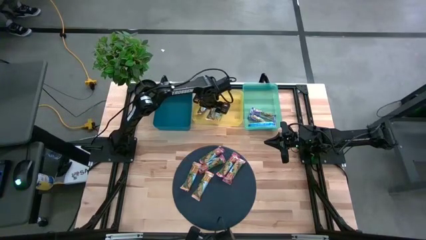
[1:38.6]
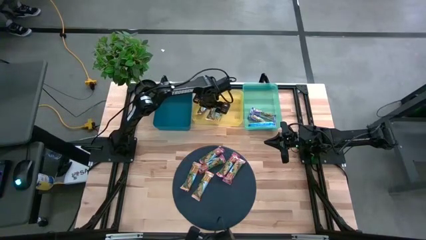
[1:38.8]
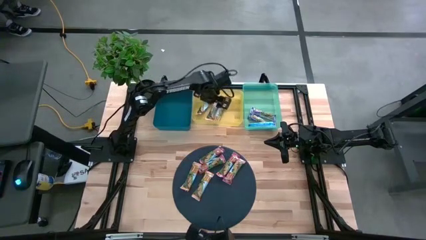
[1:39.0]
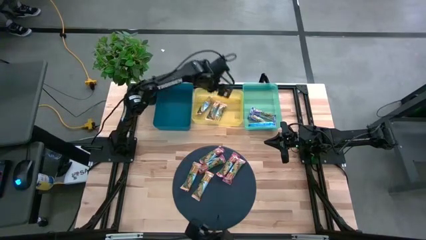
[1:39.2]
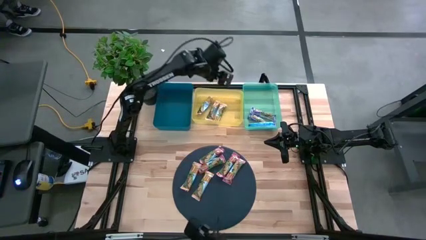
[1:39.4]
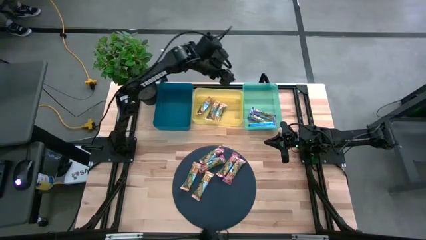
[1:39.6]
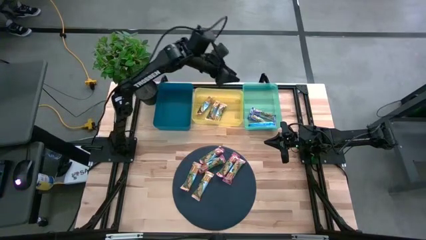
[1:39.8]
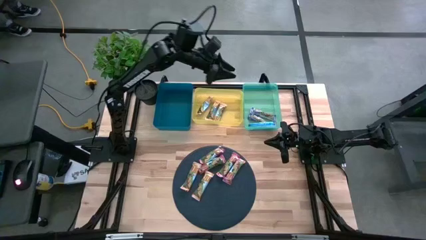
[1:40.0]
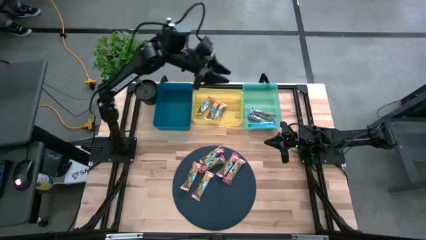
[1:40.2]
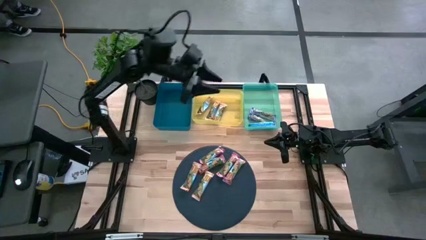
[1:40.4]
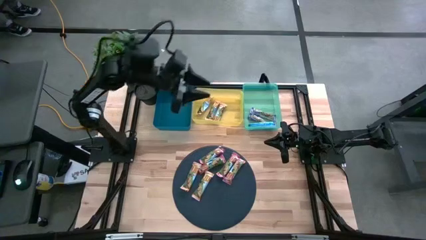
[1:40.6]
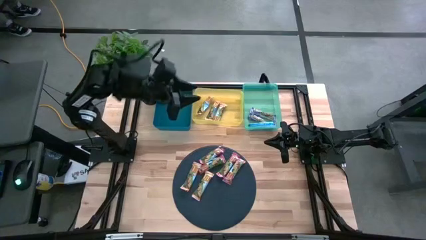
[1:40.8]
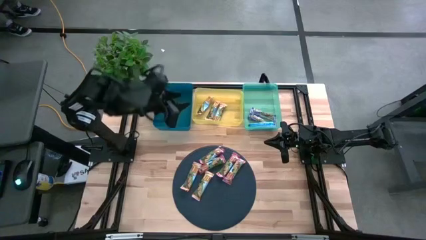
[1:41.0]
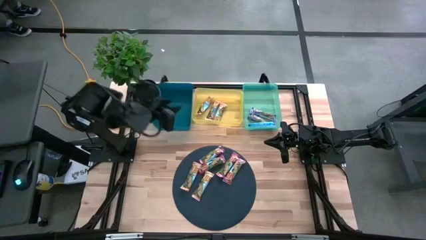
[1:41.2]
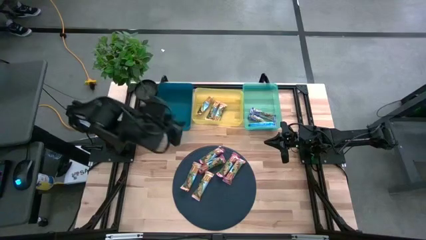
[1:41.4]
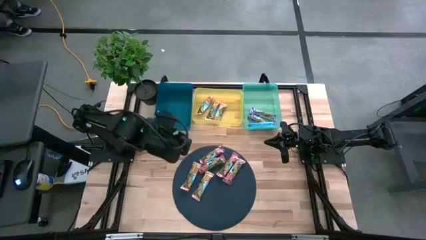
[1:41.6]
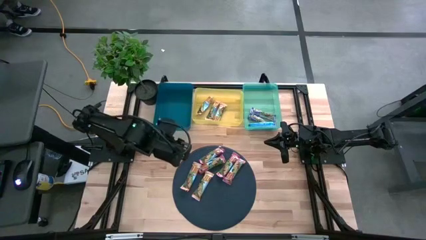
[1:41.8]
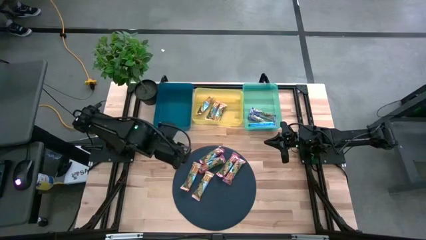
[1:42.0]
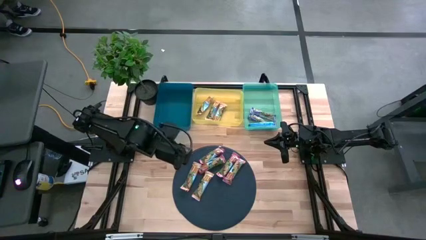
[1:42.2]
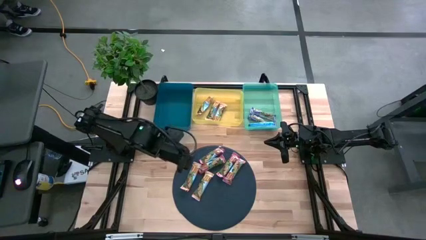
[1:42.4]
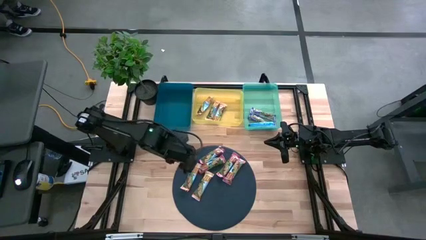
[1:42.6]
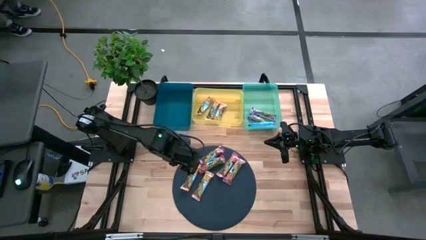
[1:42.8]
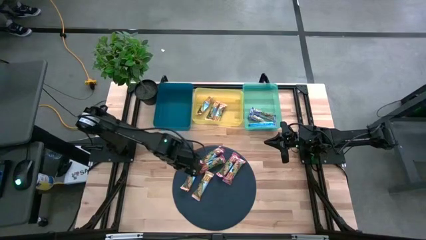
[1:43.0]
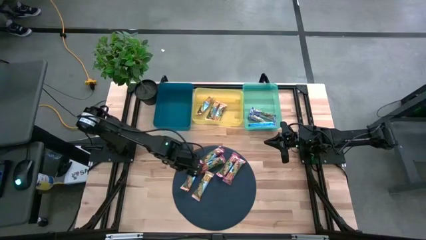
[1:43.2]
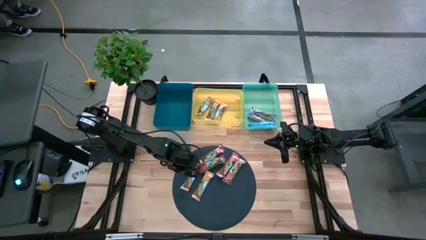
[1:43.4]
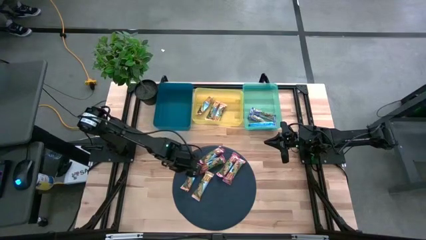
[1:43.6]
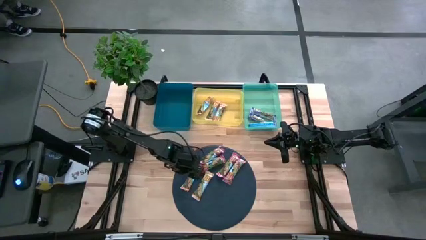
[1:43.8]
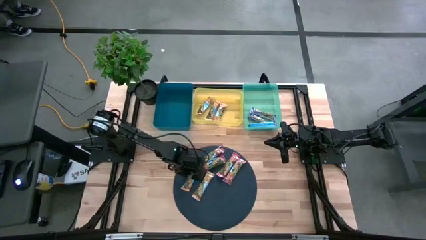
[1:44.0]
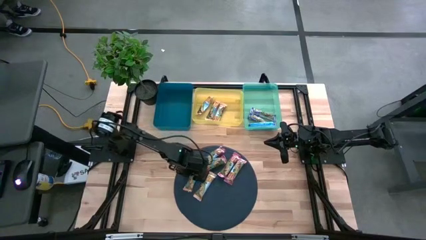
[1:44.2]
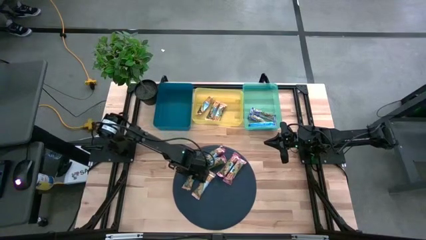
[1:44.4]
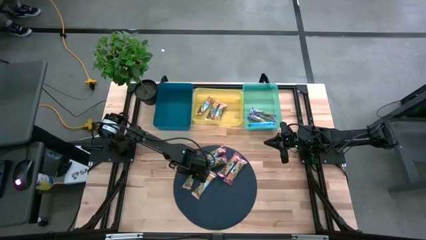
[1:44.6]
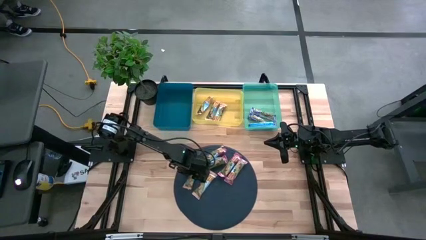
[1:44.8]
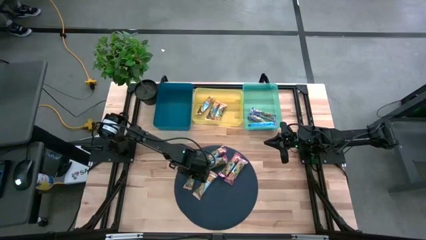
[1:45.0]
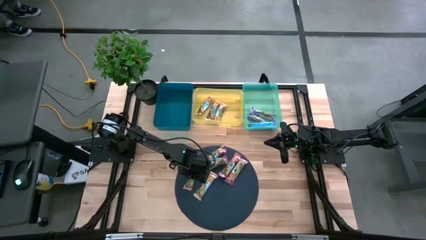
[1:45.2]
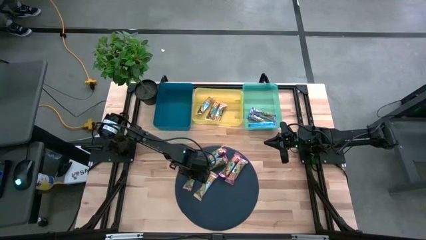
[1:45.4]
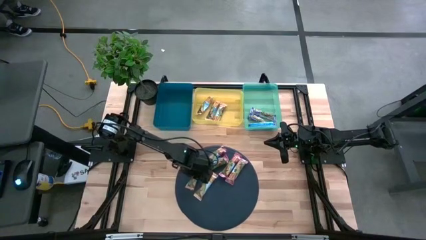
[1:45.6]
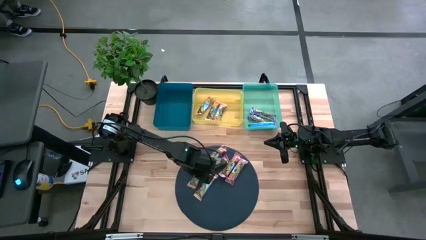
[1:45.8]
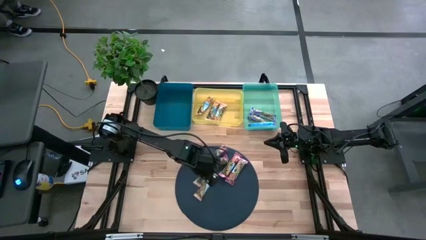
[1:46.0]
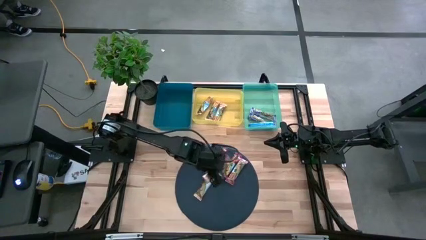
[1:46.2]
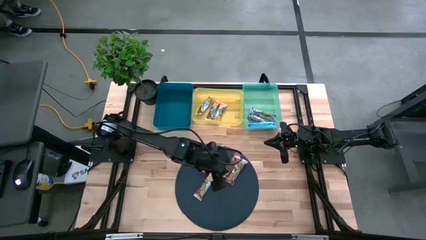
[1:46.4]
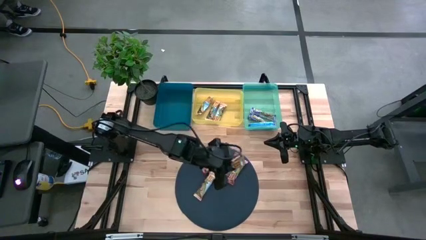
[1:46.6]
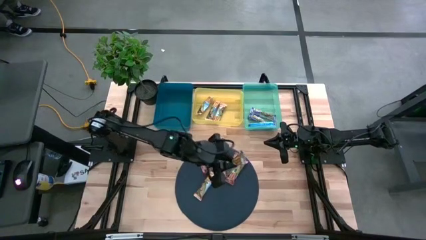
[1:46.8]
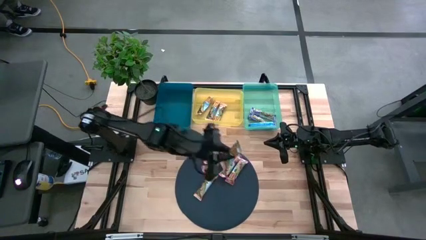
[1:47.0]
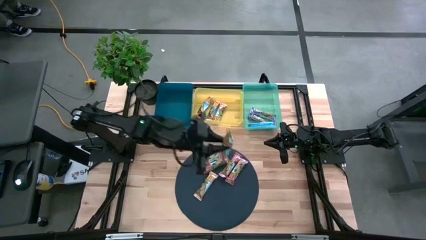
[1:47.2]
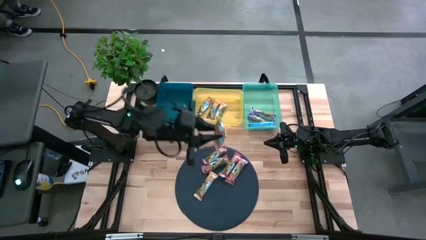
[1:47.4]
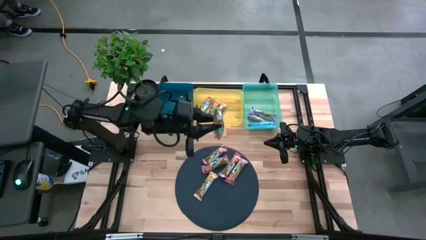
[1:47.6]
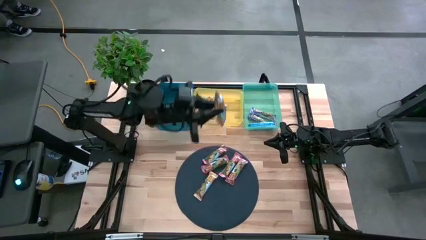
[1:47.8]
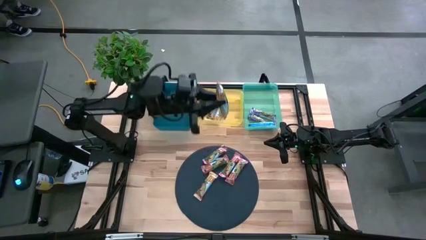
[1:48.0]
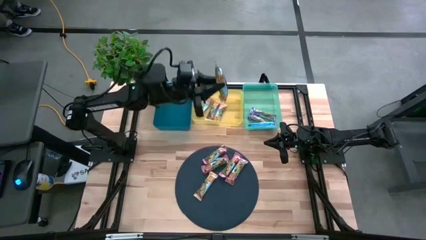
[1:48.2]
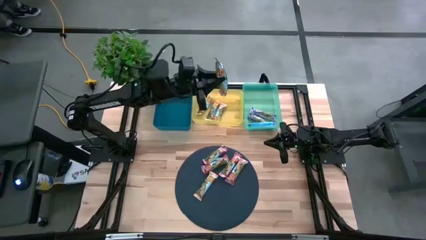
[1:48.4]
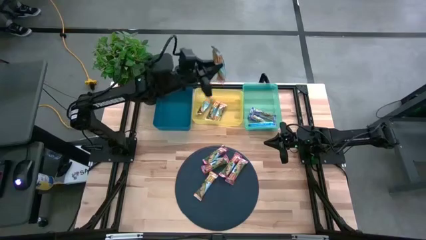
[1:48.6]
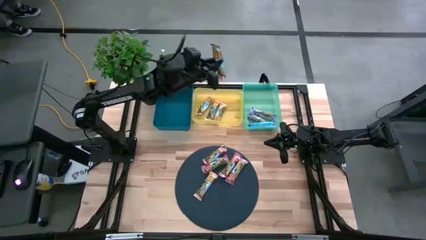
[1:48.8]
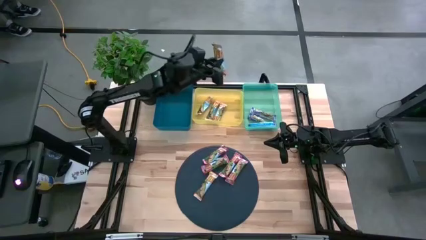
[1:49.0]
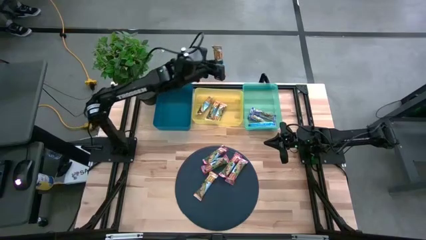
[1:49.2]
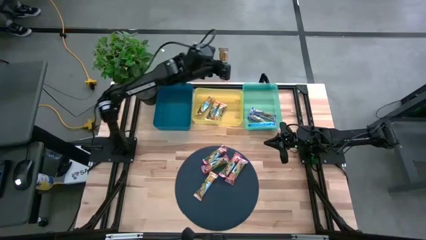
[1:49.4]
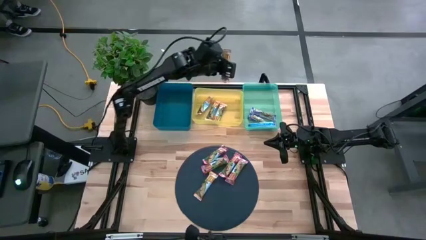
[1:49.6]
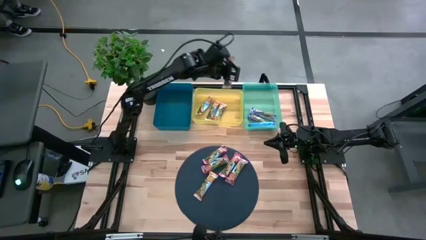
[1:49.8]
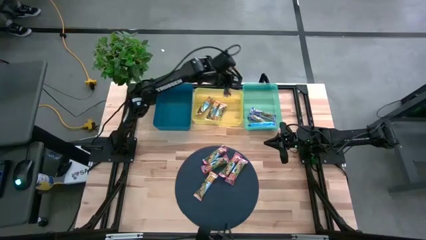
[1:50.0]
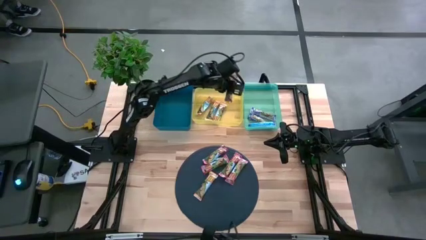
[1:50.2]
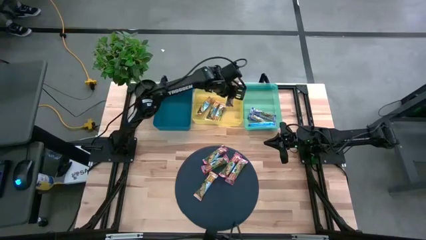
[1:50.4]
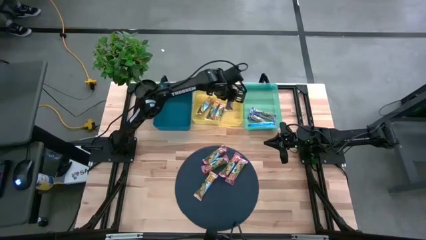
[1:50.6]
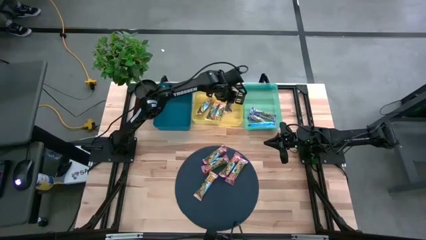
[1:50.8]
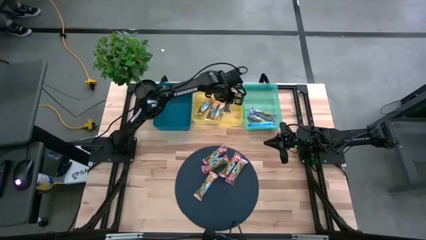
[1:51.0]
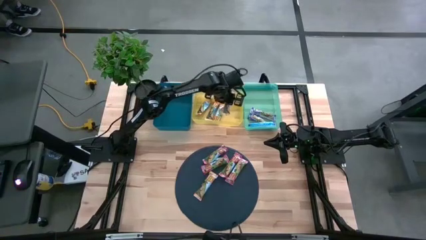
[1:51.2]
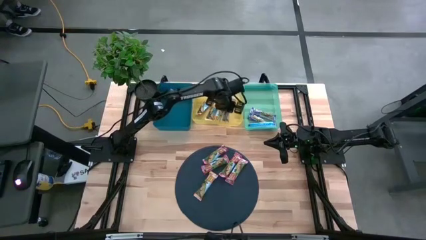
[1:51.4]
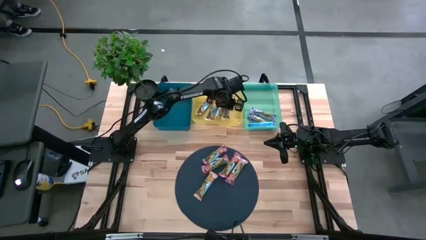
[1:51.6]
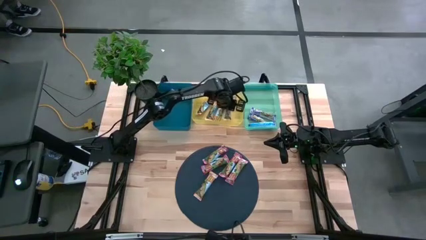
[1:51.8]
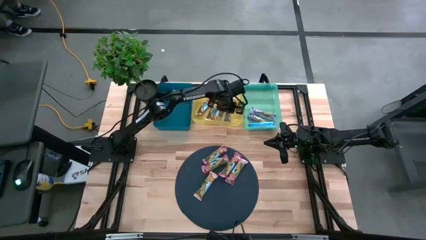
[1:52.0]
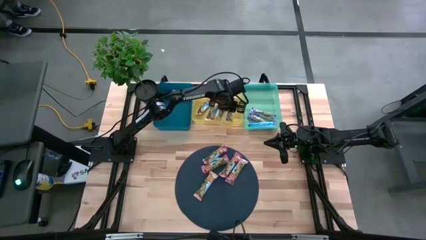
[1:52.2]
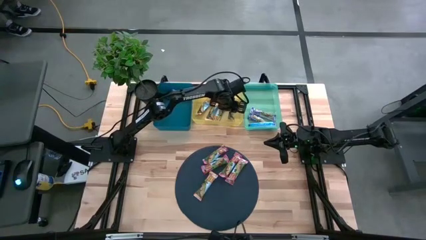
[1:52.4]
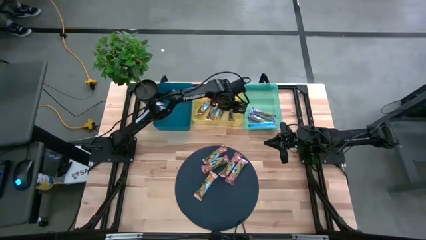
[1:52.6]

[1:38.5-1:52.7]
Task: Pick and place Granola Bars by type
Put the yellow granola bar into the yellow bin

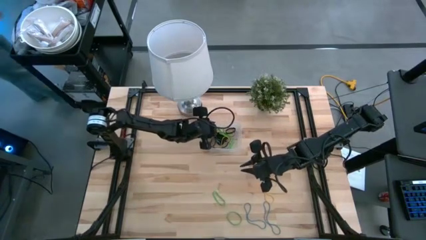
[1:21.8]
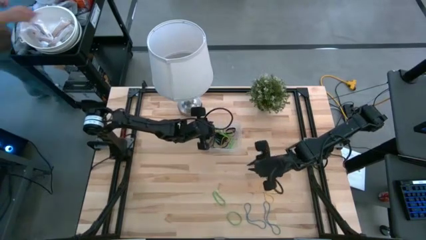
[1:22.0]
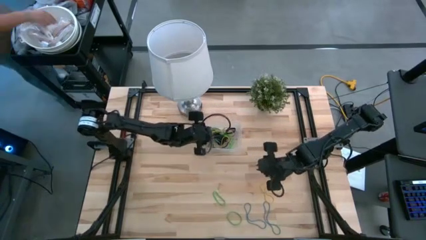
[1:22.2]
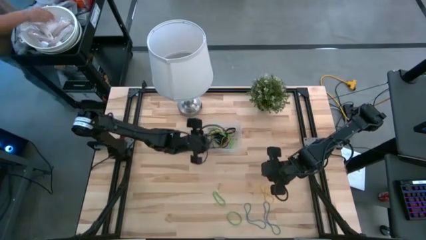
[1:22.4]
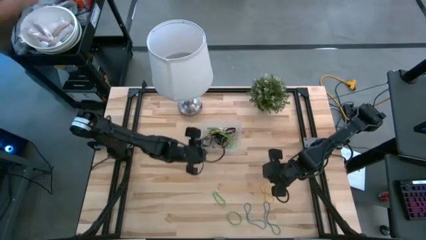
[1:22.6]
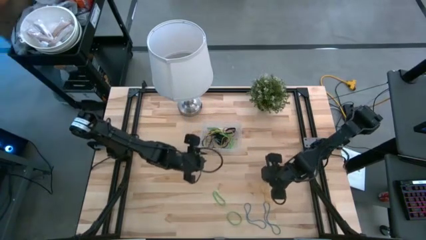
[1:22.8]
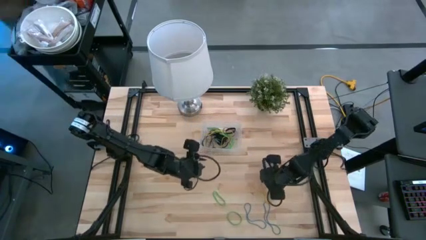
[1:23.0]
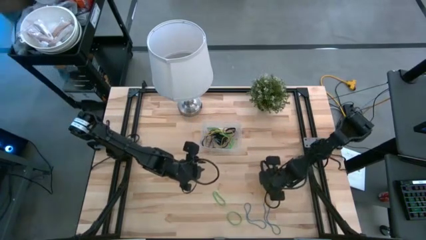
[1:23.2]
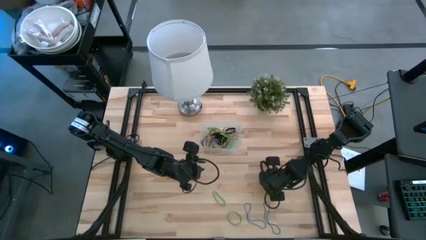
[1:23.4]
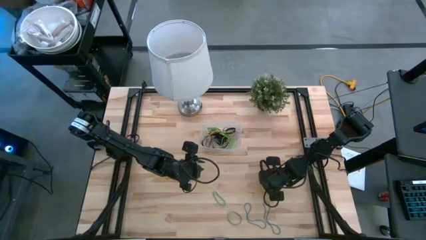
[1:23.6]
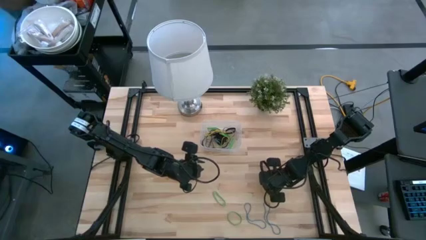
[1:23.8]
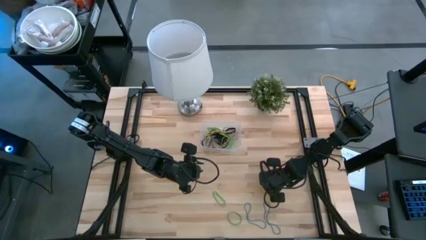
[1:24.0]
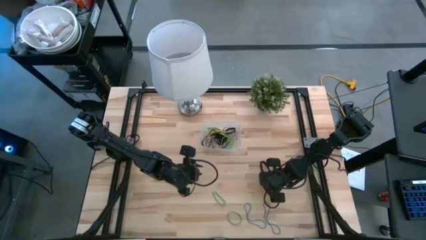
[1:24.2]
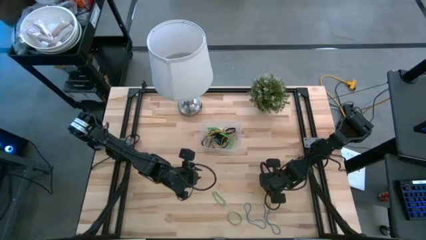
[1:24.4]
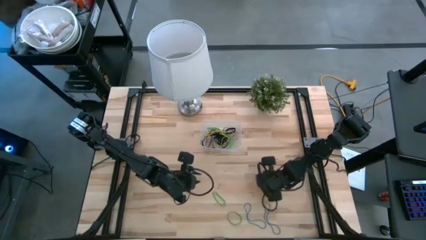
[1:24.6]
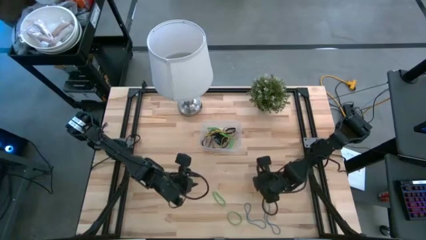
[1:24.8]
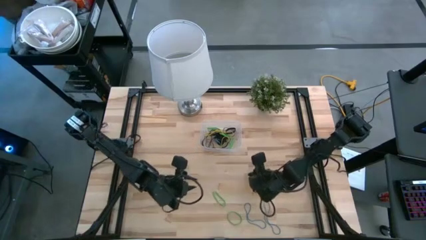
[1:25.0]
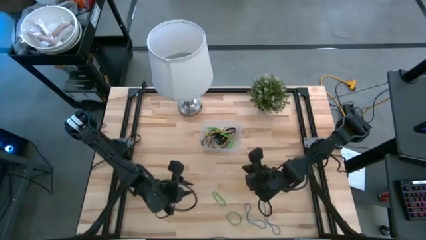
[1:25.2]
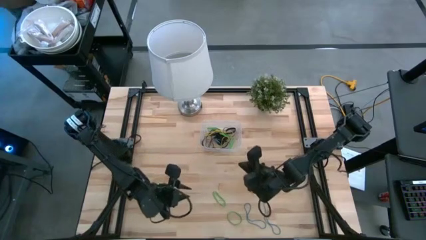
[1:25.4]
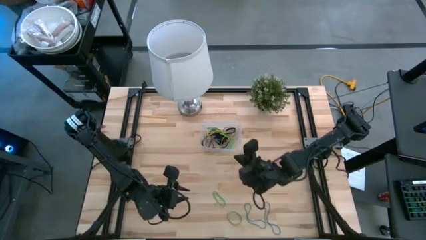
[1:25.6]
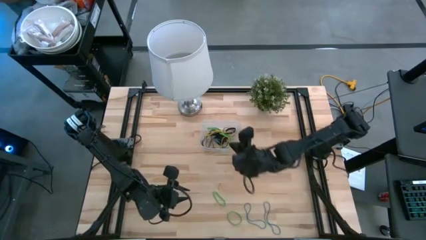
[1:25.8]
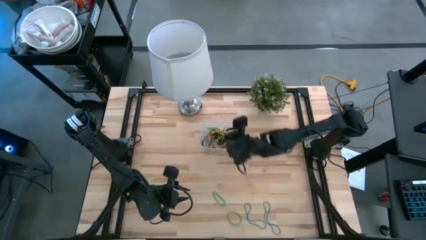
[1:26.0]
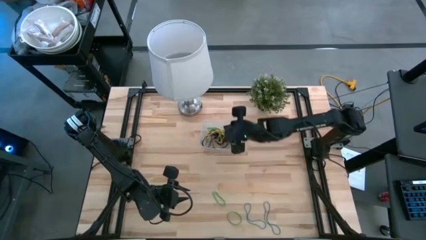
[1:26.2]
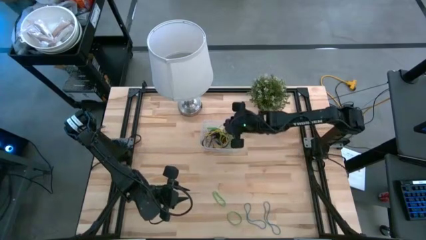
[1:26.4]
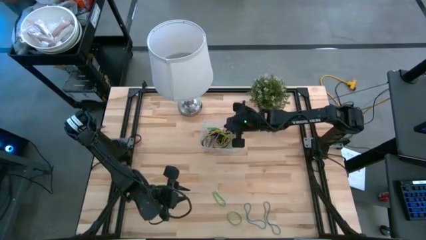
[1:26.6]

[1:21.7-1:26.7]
Task: Pick and place rubber bands into bin
Put the yellow rubber band into the transparent bin
